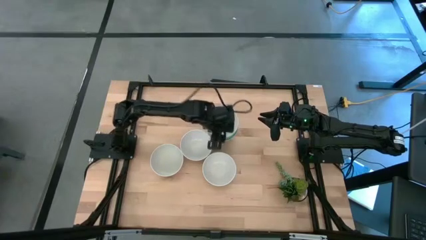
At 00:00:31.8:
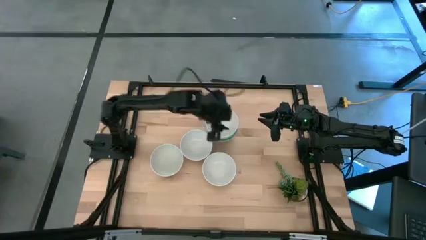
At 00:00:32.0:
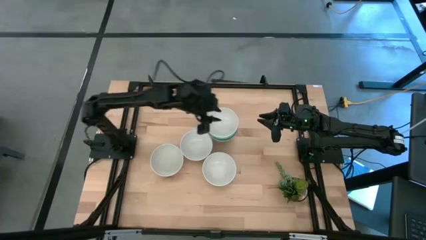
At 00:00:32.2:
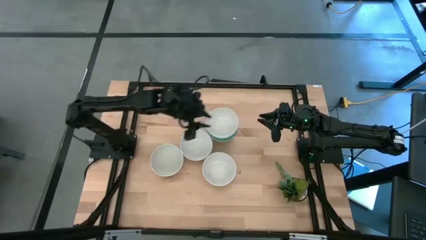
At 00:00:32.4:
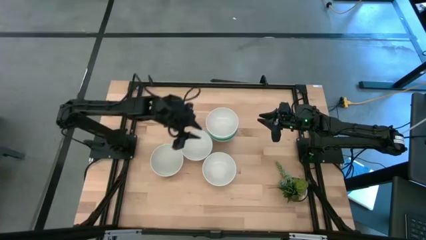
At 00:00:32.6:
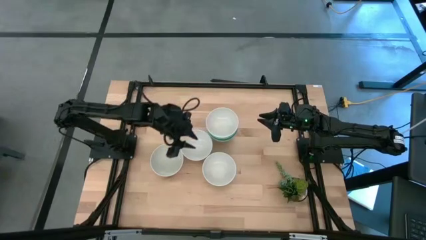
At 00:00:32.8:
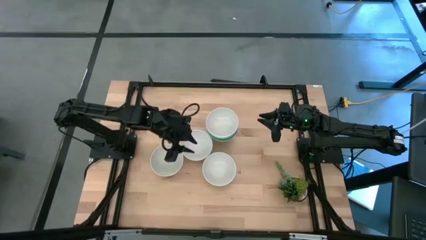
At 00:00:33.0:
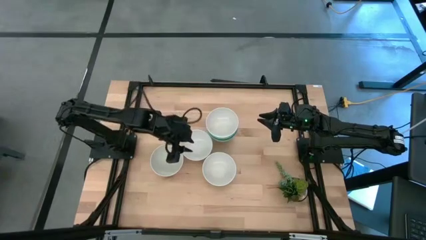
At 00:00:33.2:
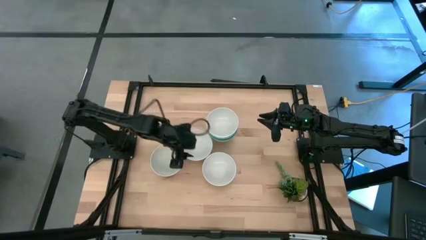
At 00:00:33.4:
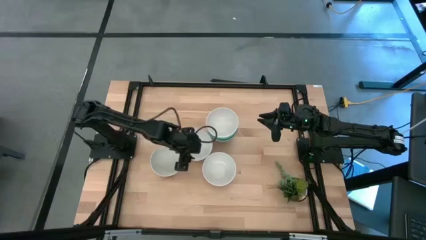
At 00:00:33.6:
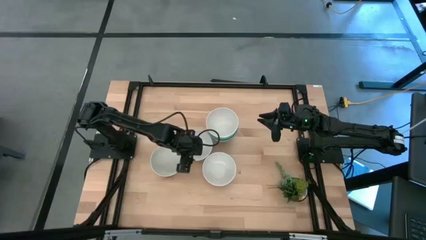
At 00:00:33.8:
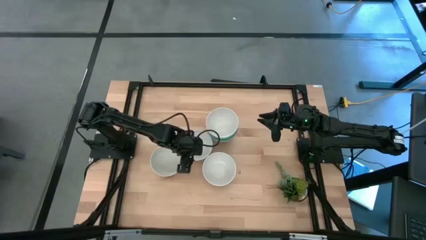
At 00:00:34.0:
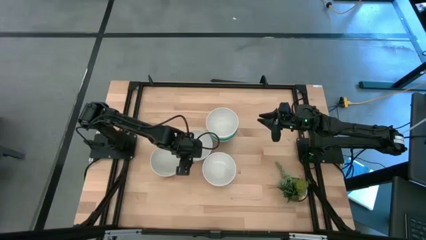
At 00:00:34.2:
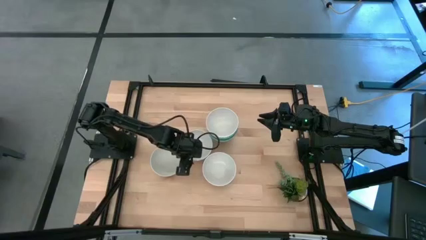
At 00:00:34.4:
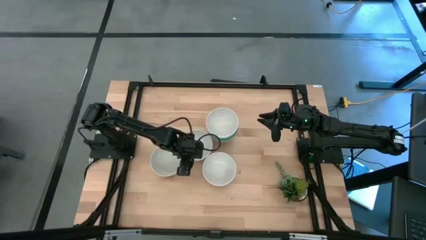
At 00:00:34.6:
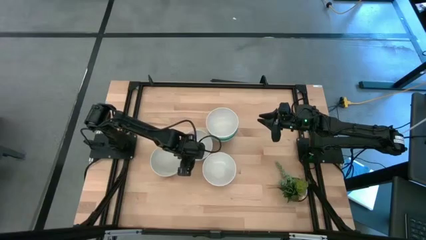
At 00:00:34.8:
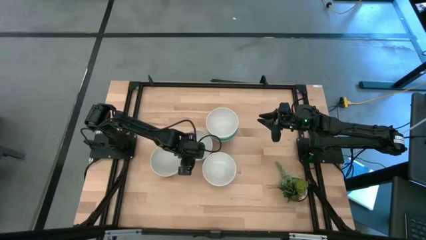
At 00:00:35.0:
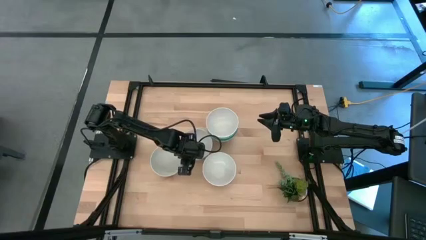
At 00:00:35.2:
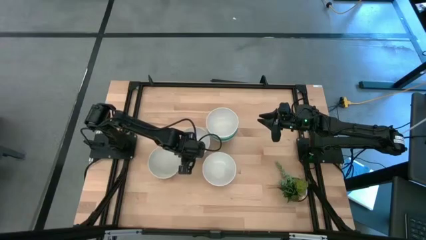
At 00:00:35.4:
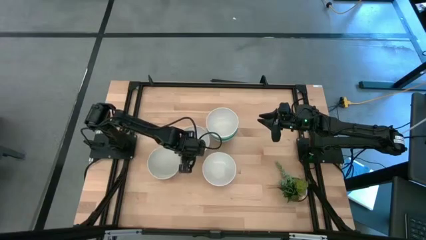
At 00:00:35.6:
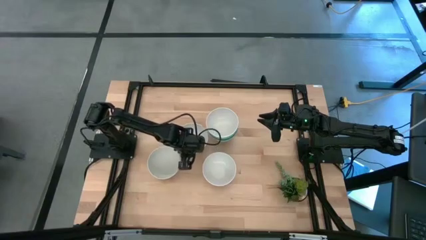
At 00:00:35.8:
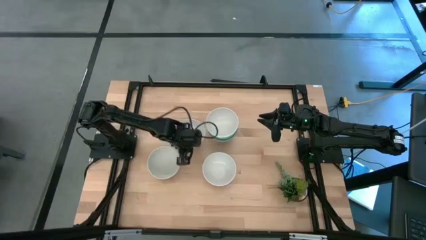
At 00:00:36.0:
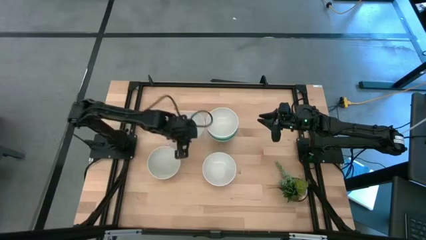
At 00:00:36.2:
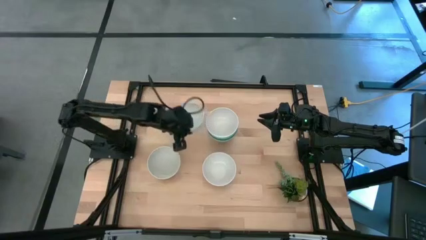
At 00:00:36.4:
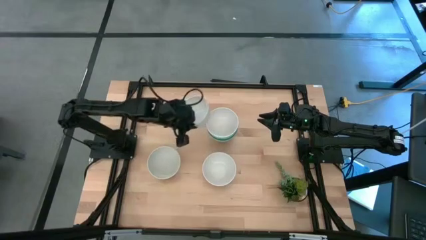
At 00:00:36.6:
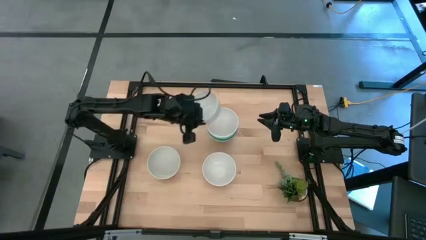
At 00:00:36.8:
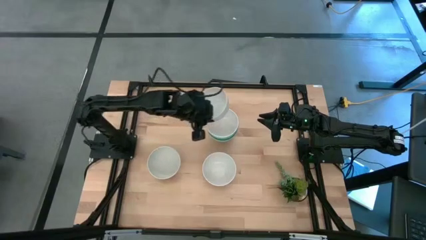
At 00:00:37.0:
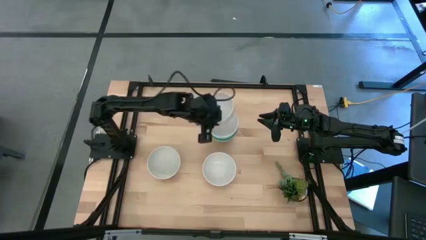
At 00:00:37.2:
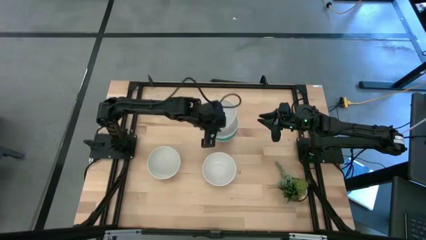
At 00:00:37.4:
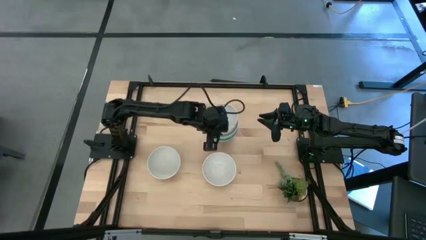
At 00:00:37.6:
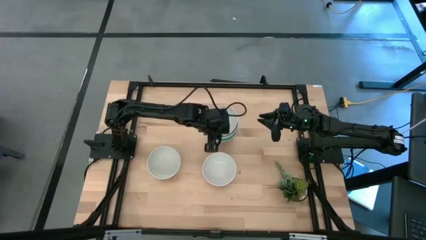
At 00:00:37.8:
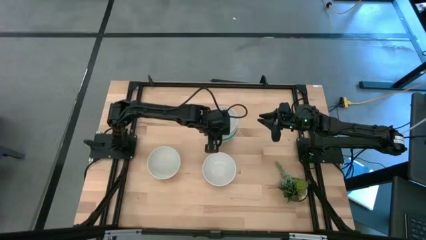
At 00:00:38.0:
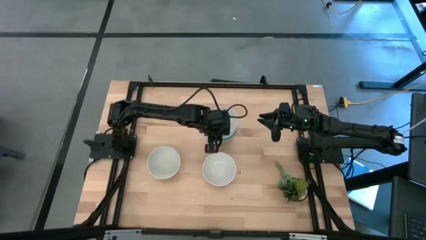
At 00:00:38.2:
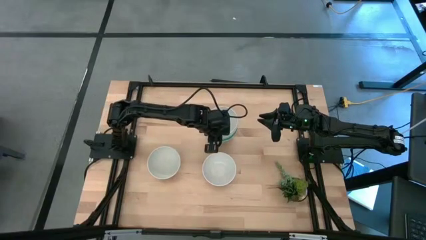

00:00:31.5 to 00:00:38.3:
Task: Nest bowls inside each other
Stack the white bowl on the other white bowl

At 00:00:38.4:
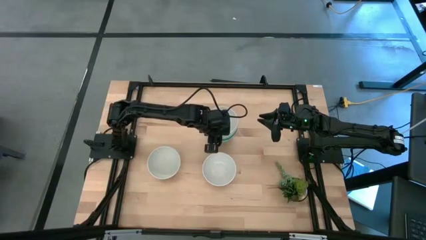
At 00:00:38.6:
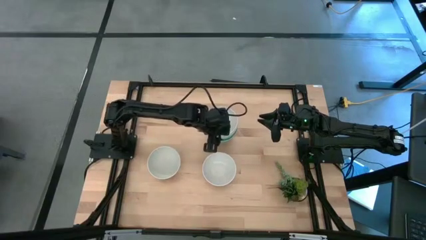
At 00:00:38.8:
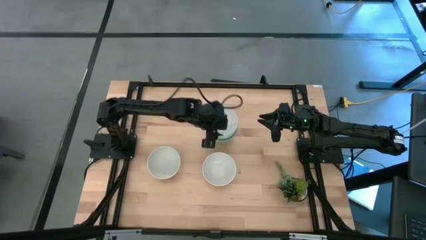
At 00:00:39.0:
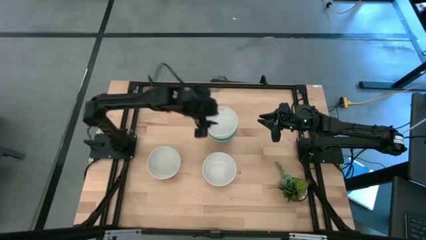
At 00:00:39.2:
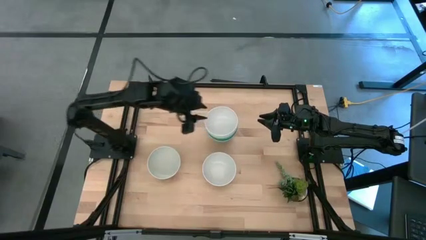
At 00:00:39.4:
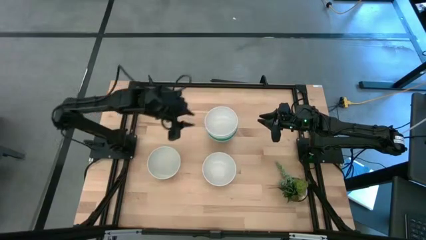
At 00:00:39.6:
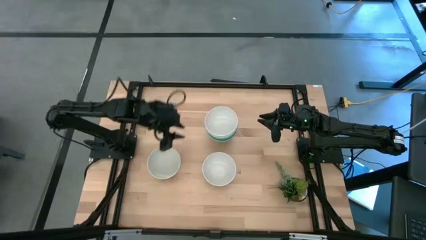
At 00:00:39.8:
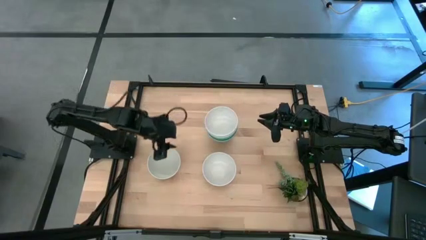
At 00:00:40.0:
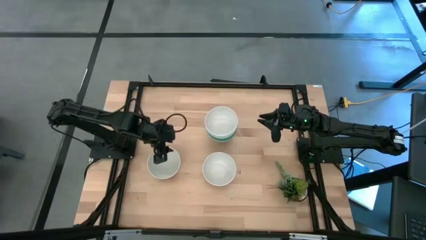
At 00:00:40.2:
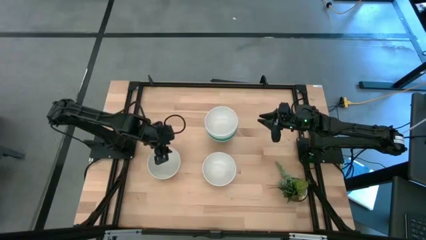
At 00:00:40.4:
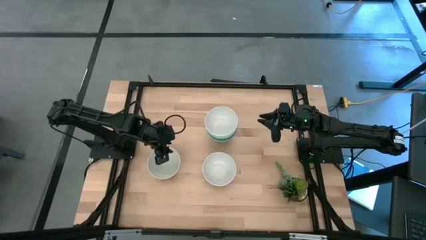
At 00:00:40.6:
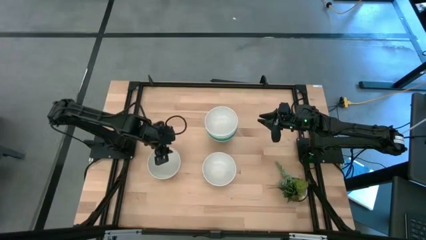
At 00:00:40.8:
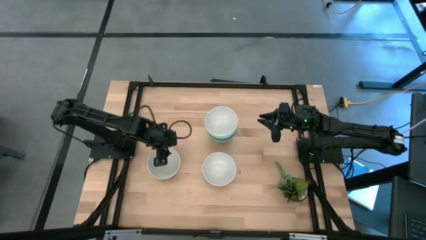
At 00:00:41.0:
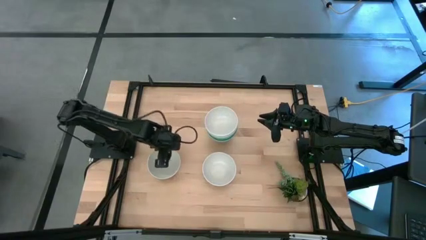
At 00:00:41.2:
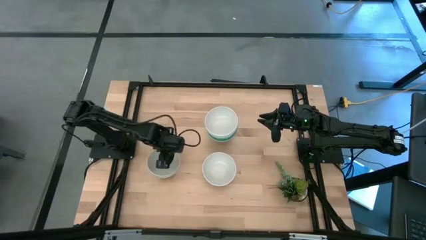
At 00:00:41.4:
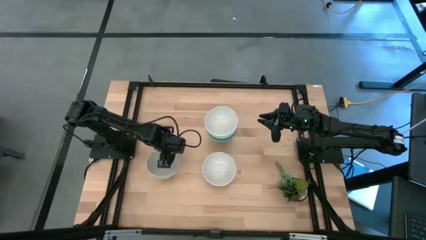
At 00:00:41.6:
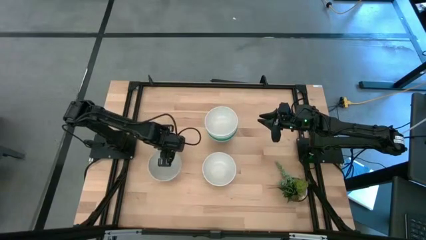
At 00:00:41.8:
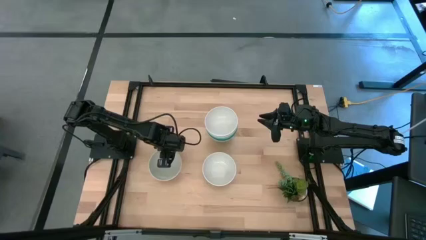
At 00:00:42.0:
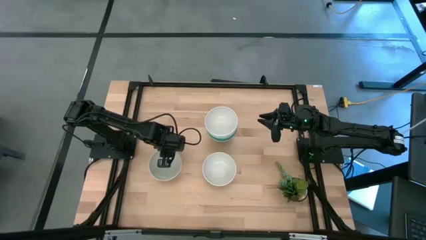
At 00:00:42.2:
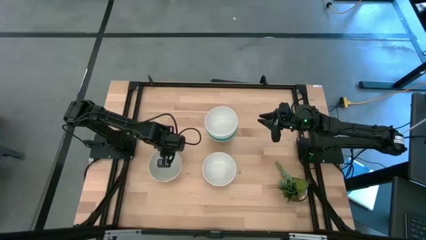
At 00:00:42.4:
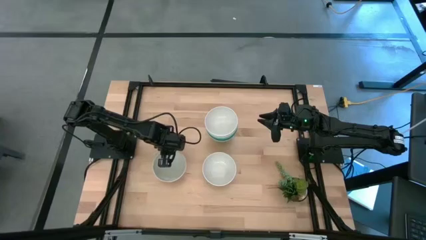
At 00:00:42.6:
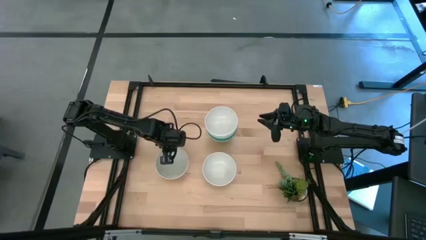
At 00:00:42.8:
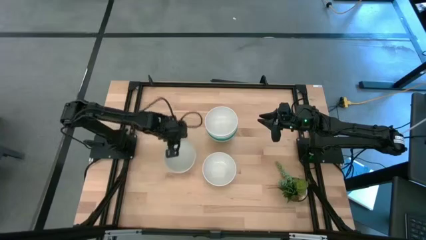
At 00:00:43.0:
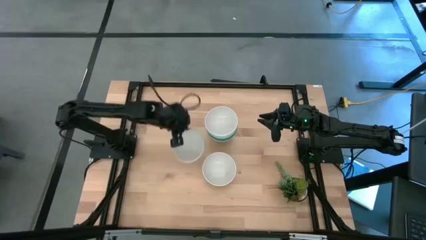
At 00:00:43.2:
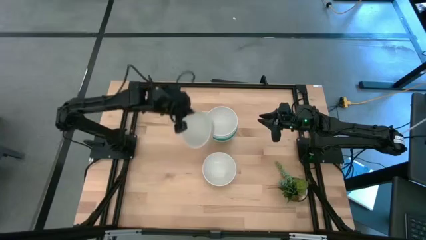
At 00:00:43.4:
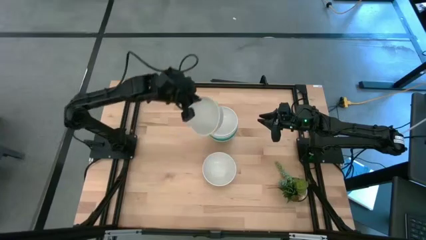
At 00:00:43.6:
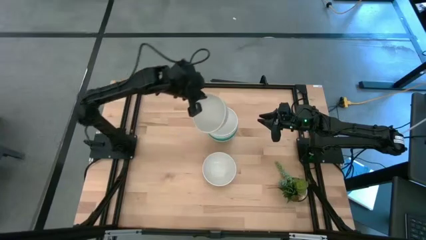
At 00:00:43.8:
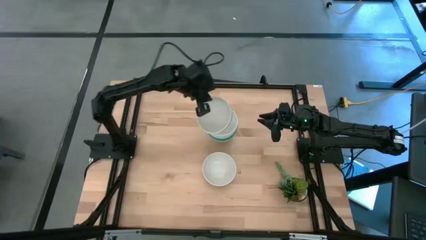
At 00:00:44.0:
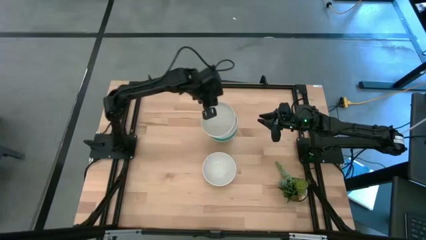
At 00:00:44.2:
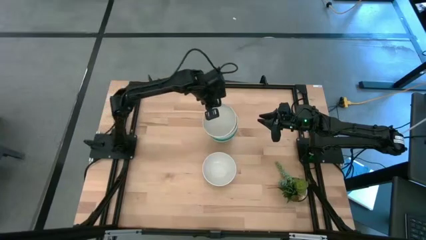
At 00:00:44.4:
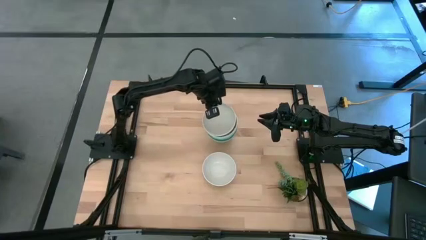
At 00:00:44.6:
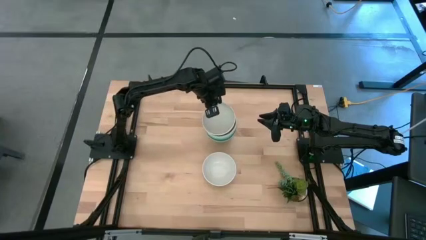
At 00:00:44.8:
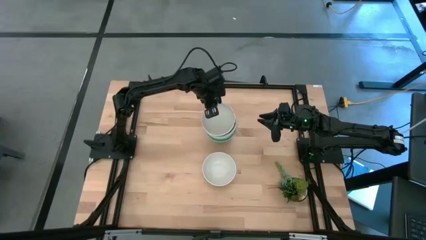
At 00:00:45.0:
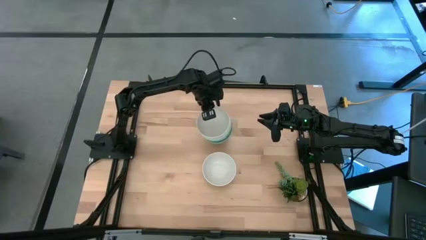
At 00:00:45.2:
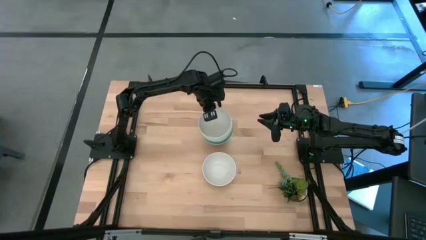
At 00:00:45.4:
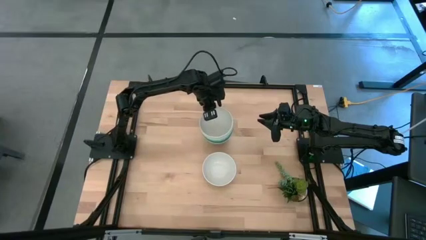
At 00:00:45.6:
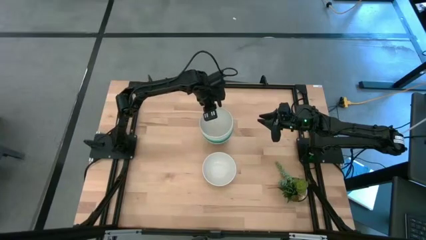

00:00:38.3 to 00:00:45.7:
Stack the white bowl on the other white bowl

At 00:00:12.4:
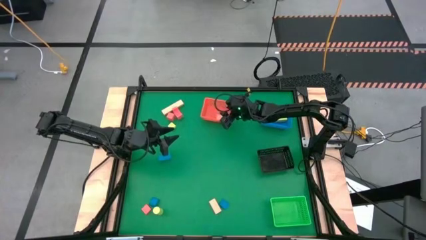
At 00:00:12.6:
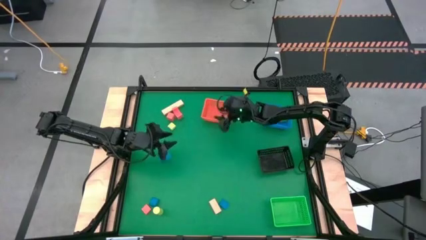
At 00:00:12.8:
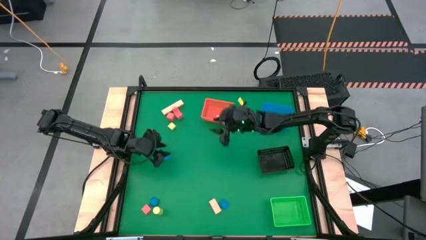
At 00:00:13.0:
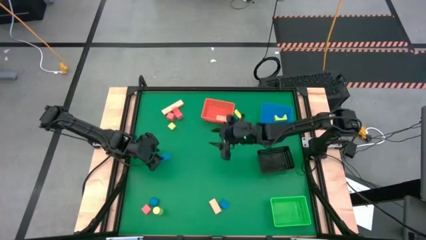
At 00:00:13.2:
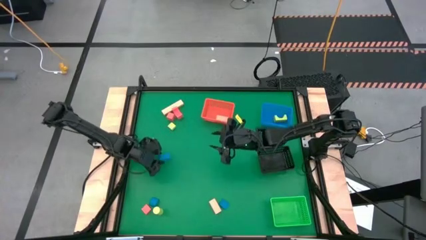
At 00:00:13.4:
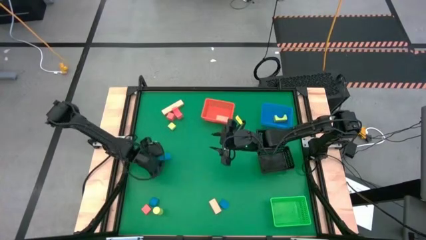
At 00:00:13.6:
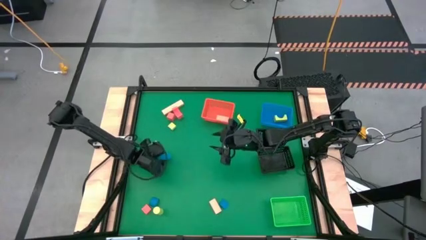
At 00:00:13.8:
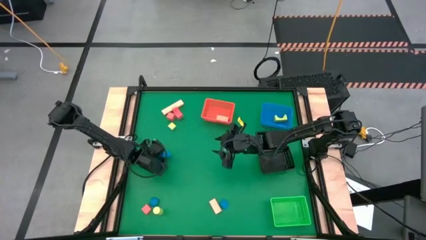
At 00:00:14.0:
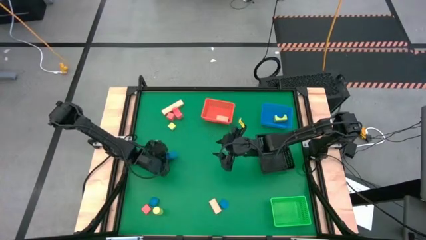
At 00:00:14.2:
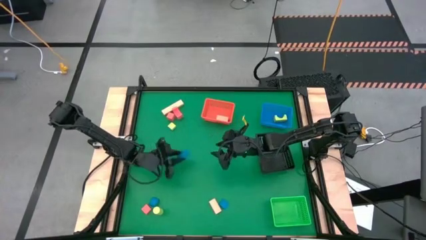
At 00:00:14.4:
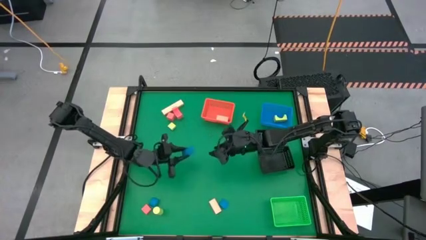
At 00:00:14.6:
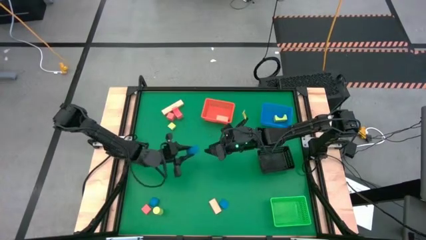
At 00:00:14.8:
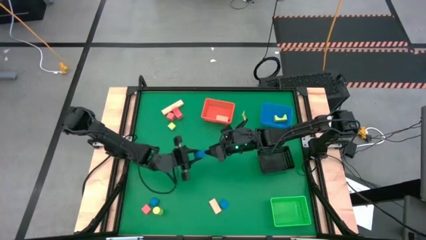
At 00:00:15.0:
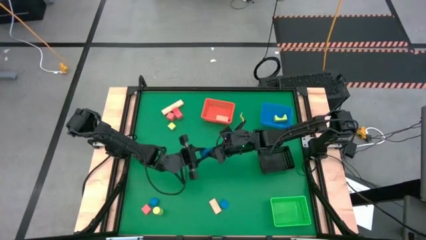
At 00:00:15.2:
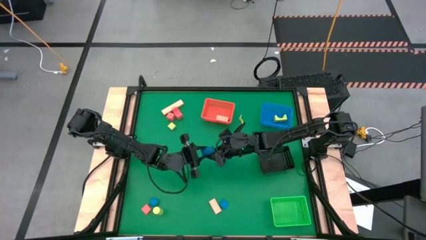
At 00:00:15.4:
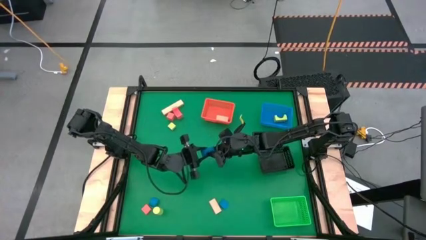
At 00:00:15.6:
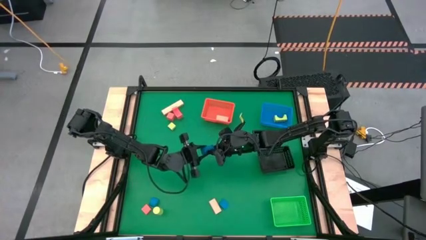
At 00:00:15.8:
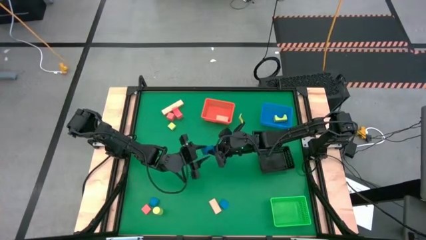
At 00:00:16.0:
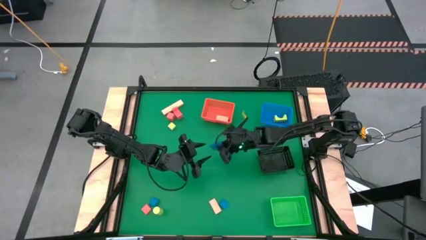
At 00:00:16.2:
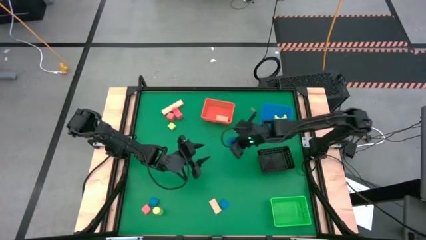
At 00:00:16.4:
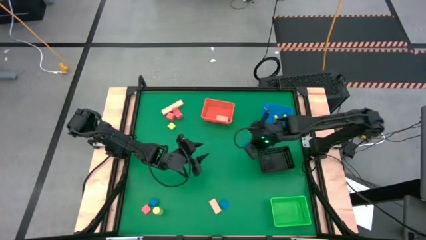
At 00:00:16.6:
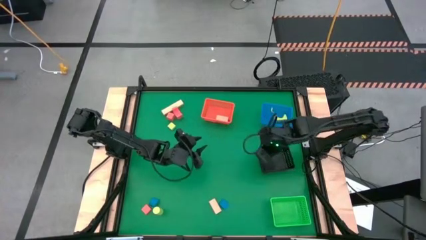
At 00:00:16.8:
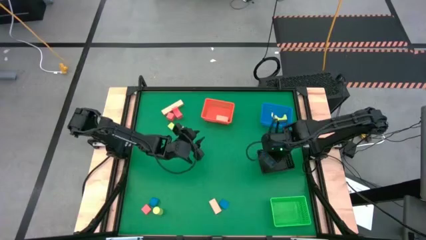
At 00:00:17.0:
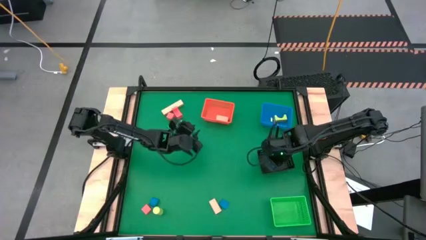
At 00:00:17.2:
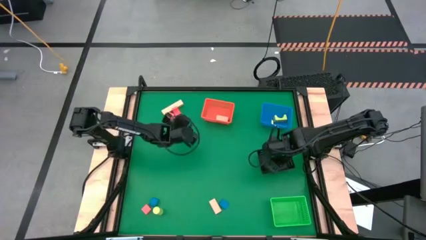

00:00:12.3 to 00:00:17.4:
Task: Sort & place blocks by color
Put the top blue block into the black bin
